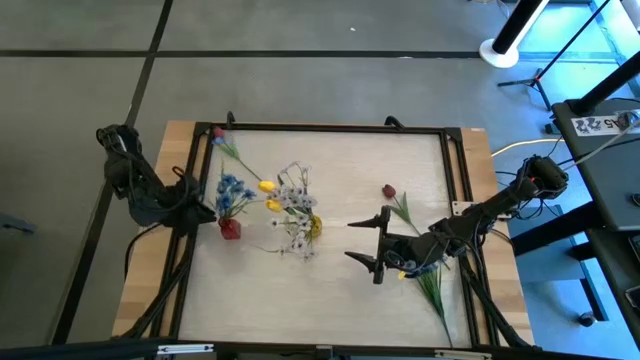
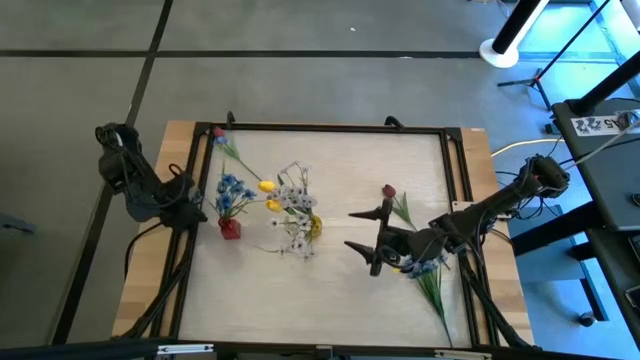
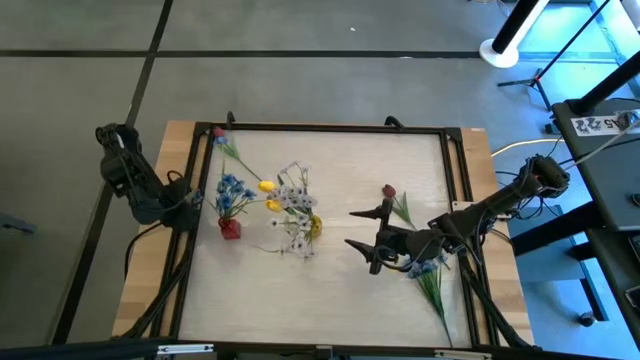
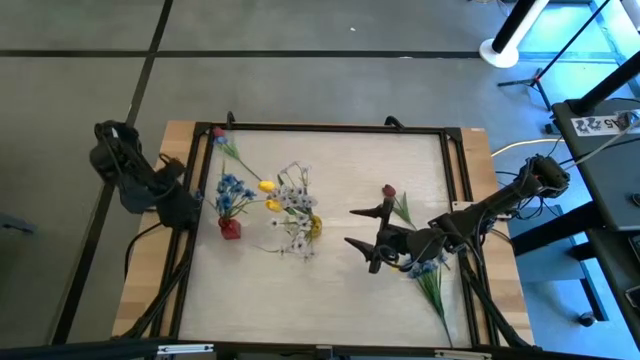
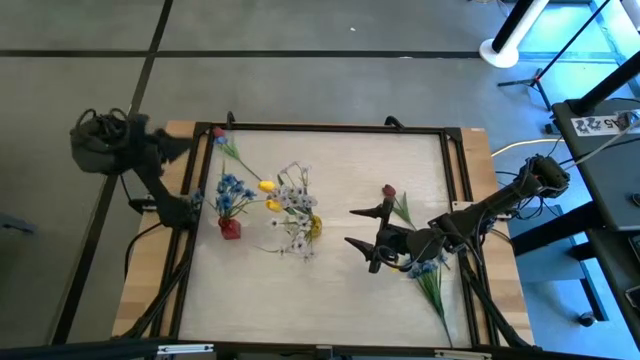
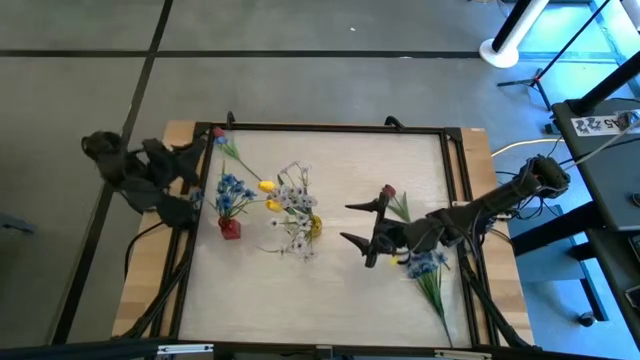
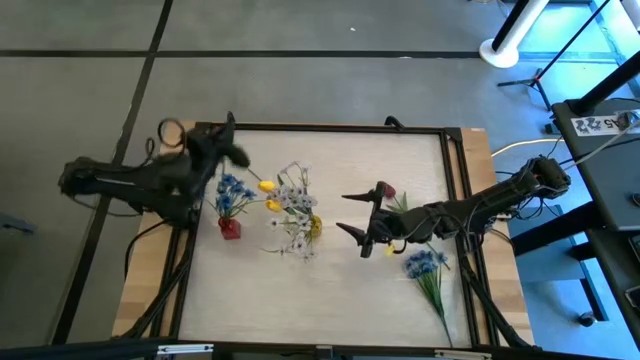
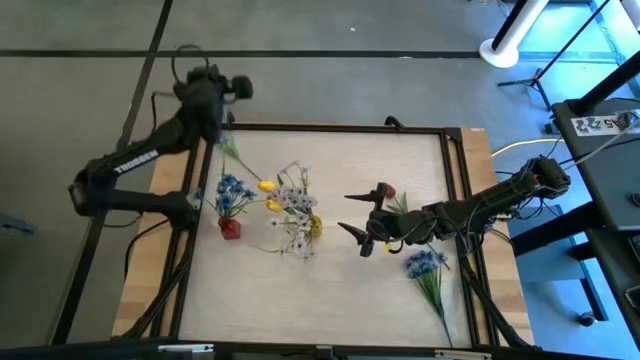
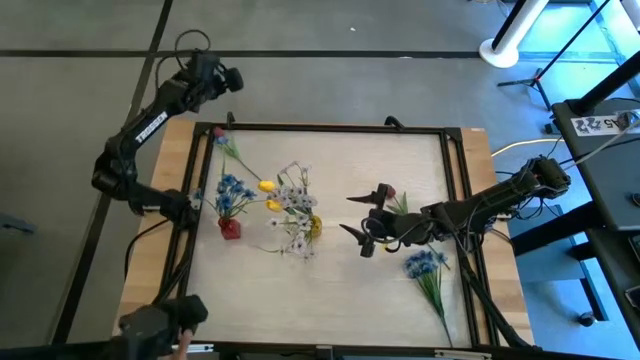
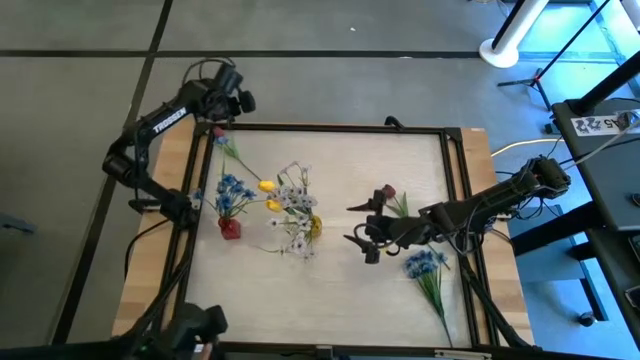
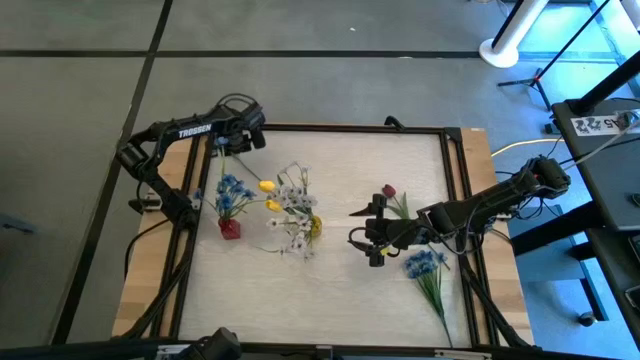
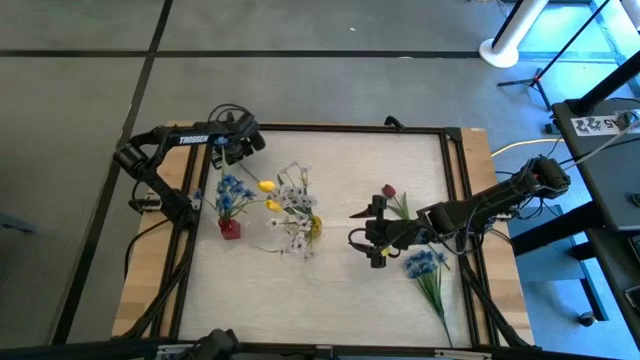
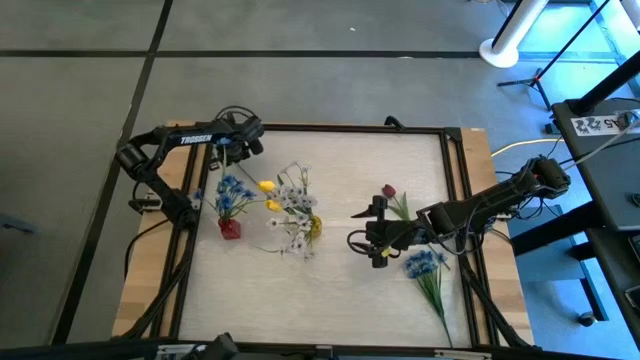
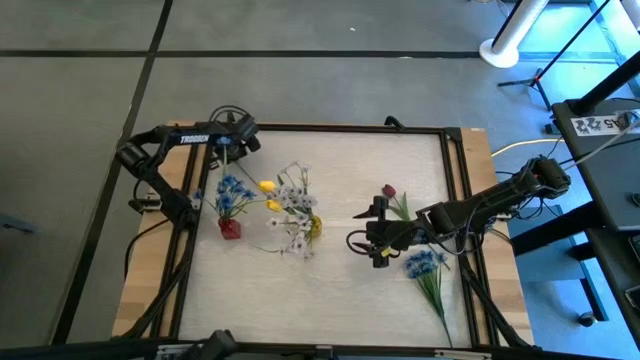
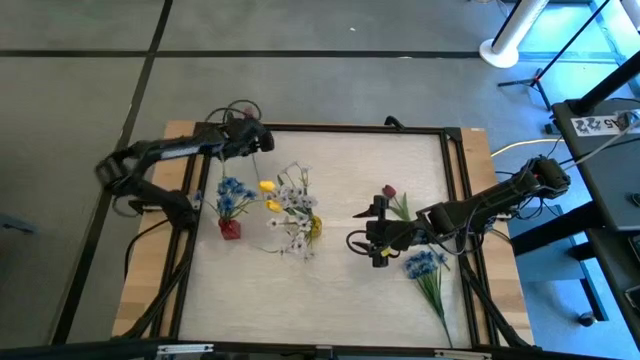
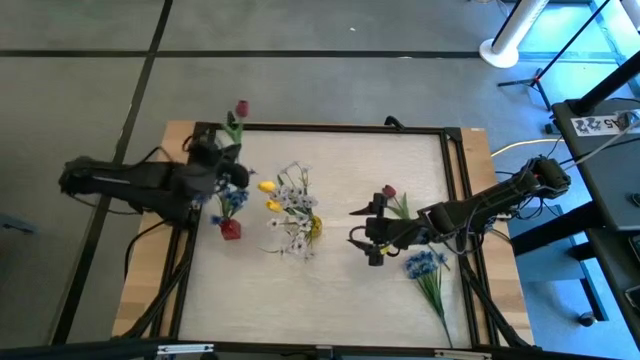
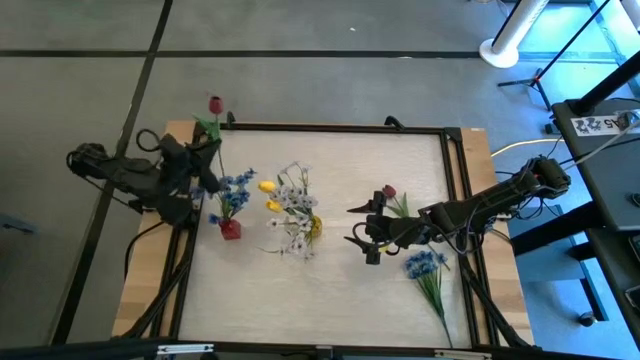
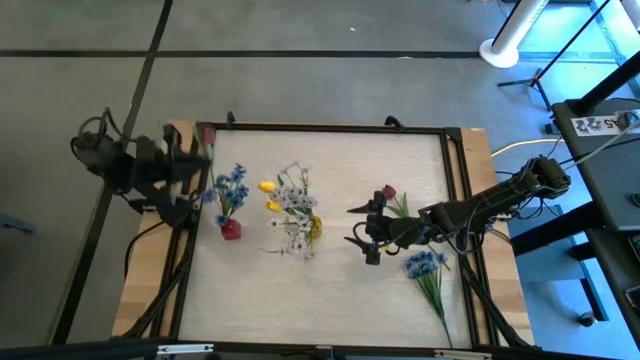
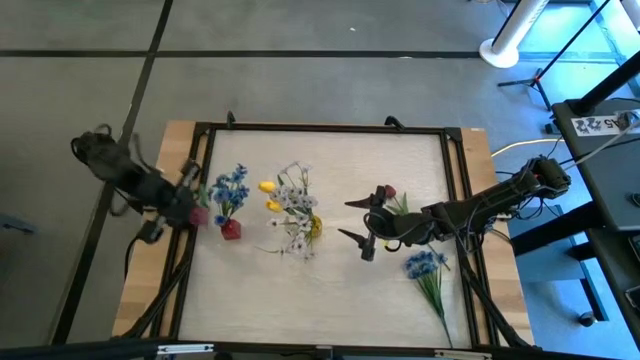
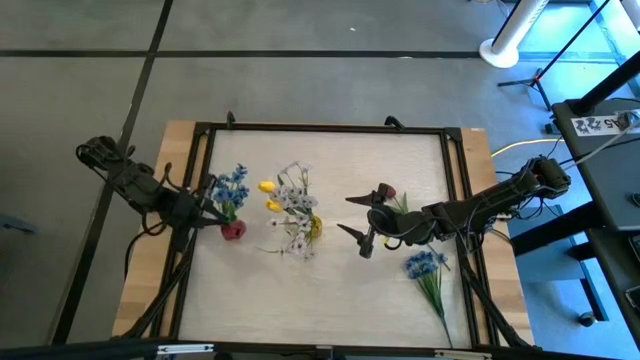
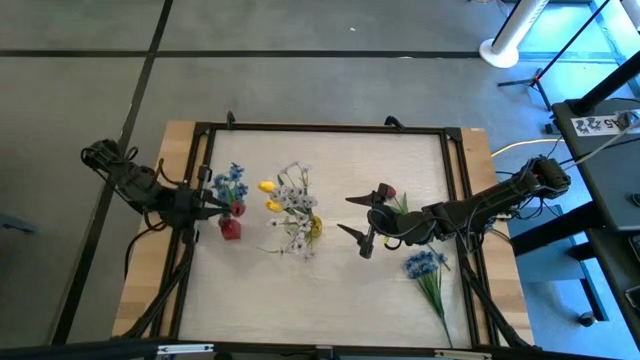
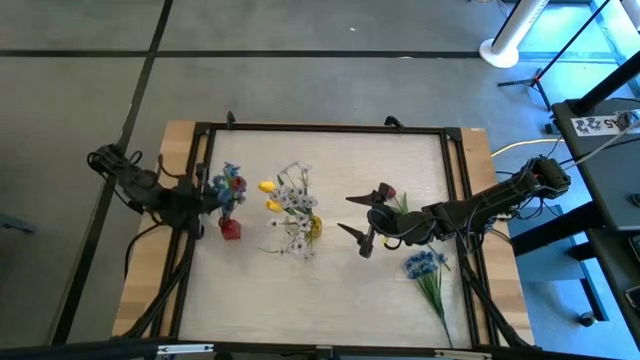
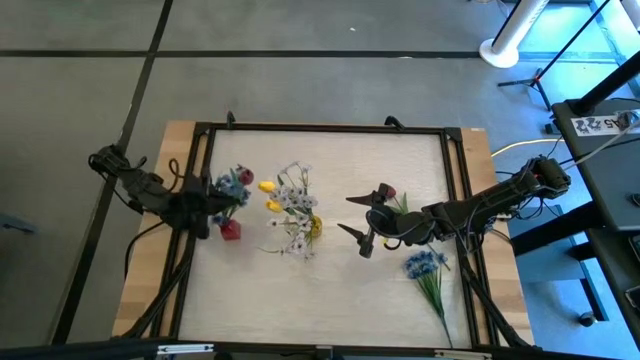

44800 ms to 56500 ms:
Task: Sort flowers into vase by color
Put the top dark red tulip into the red flower vase

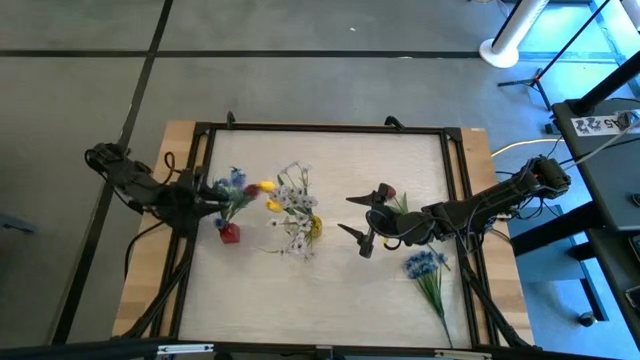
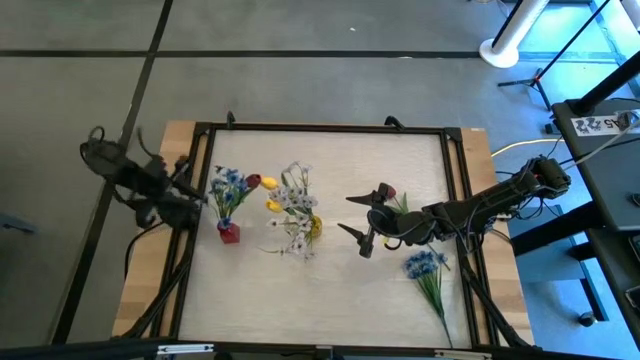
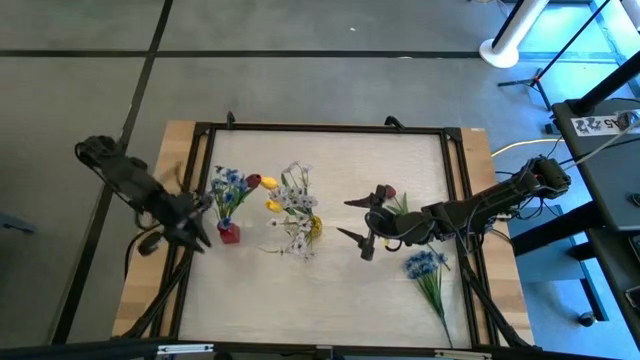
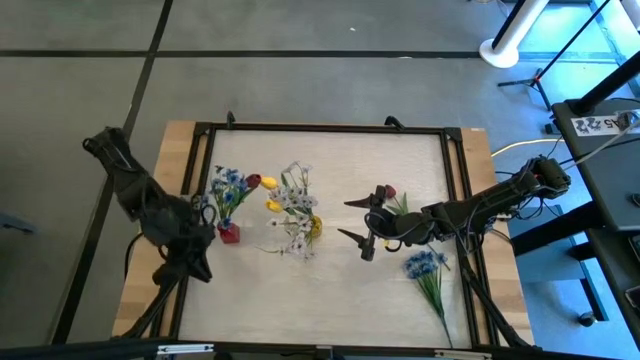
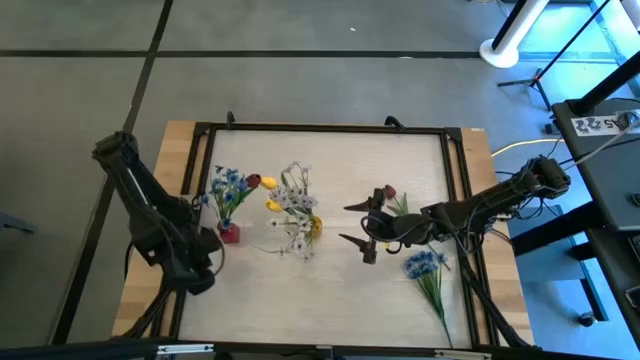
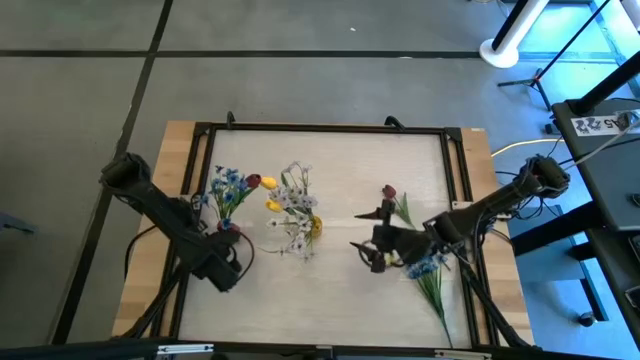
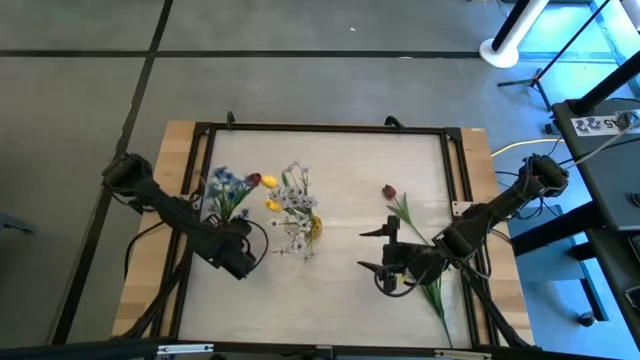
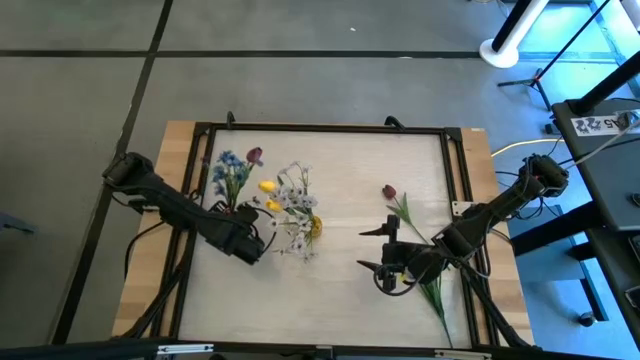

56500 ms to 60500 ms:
Adjust the red flower vase

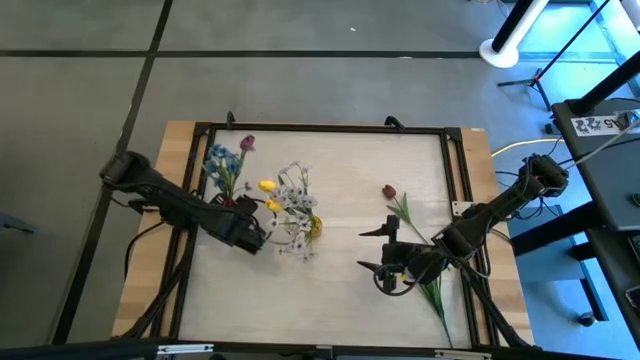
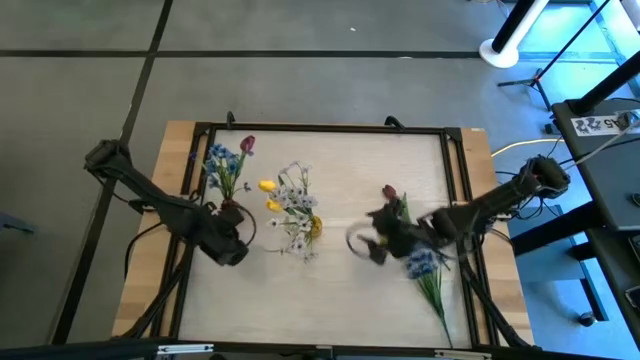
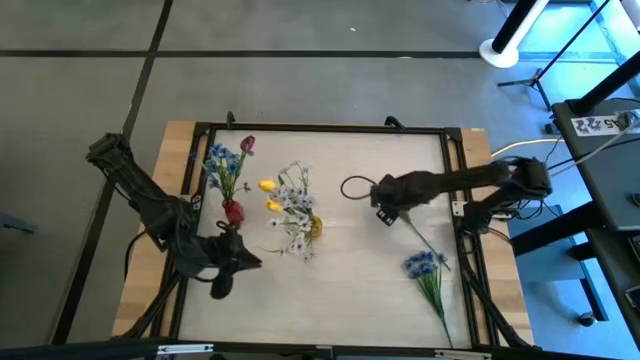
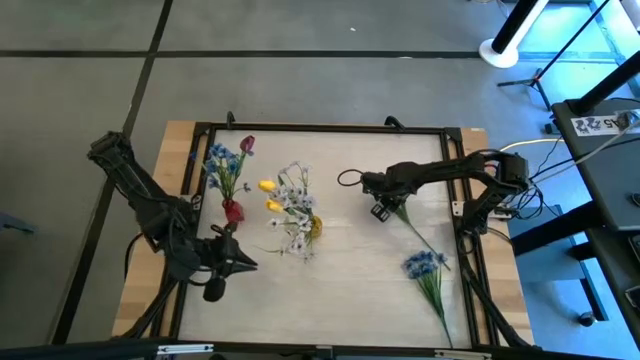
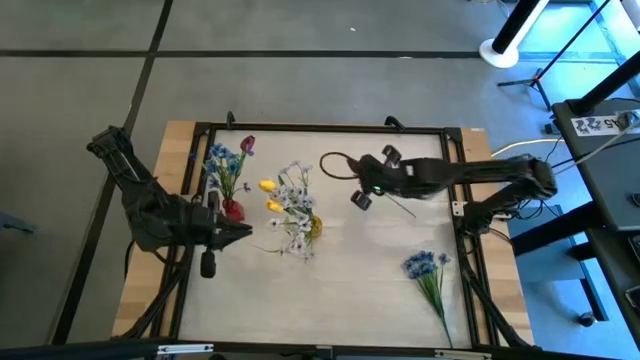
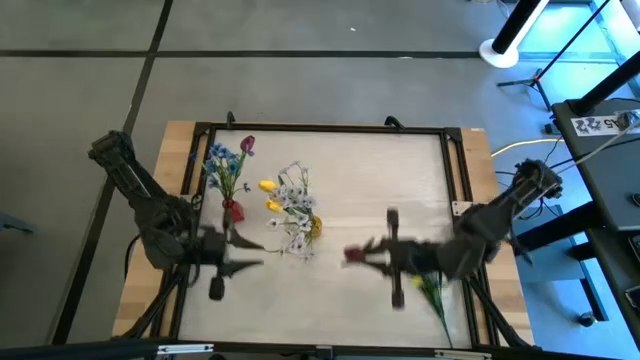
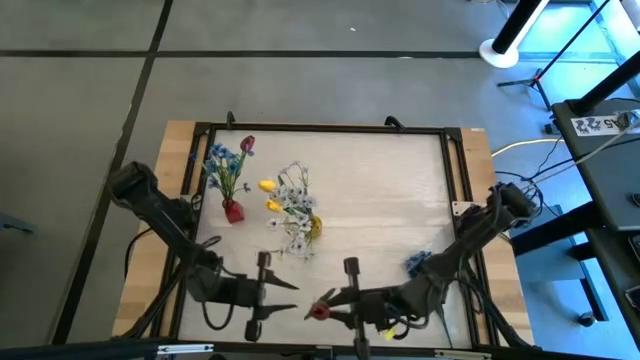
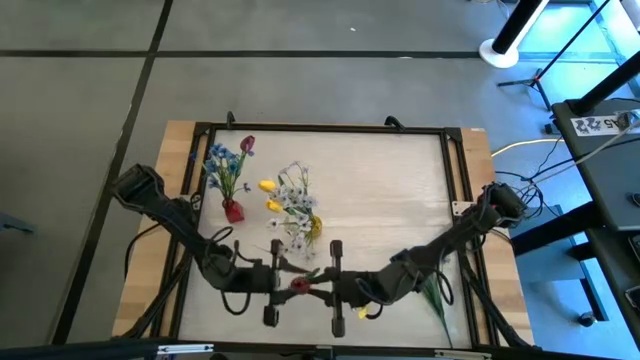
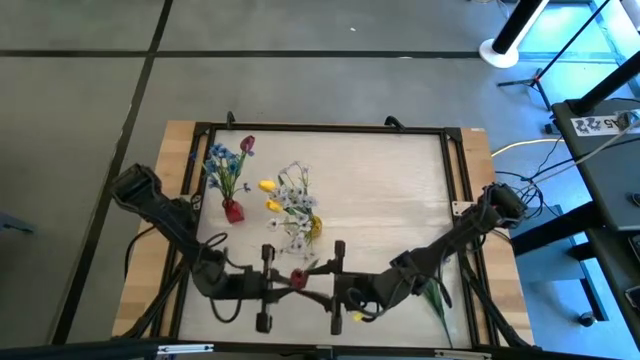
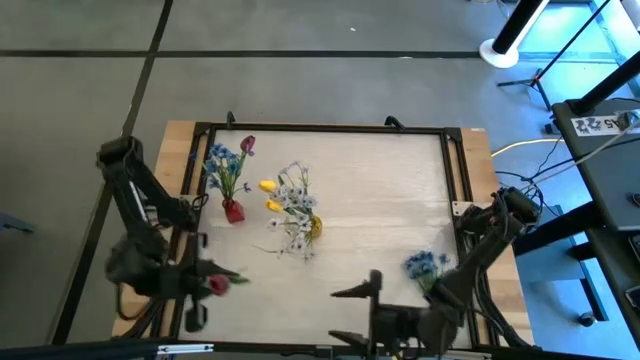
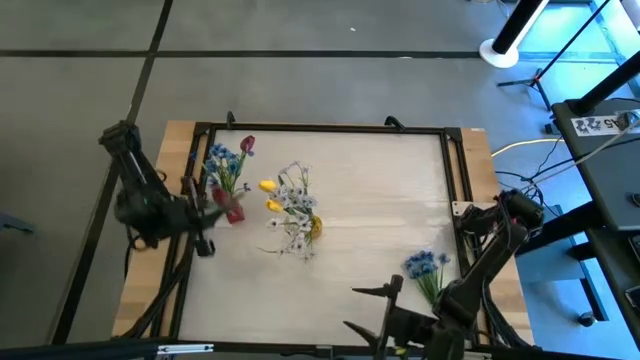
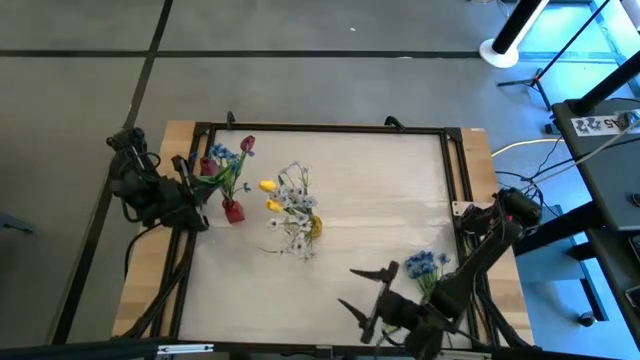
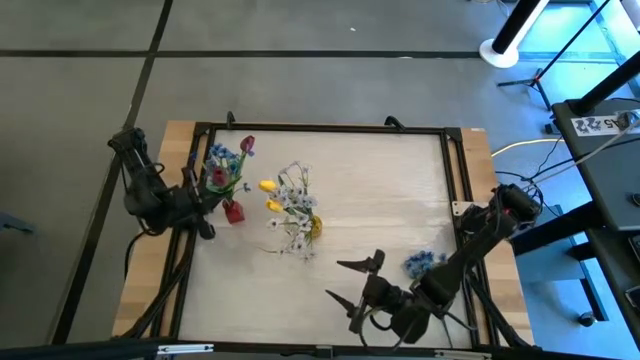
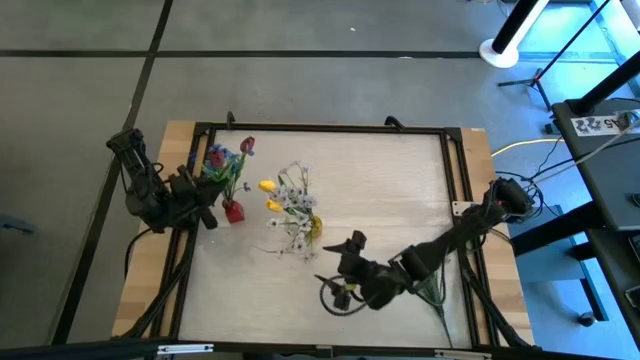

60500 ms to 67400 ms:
Put the dark red tulip into the red flower vase
